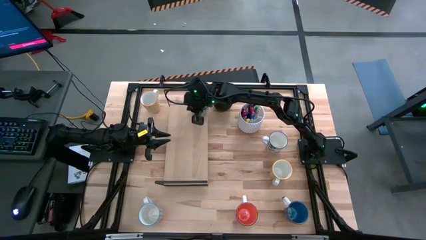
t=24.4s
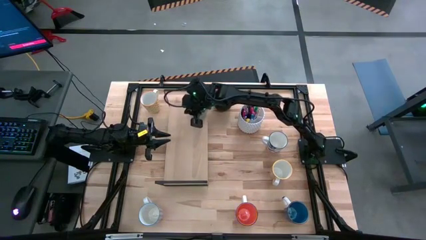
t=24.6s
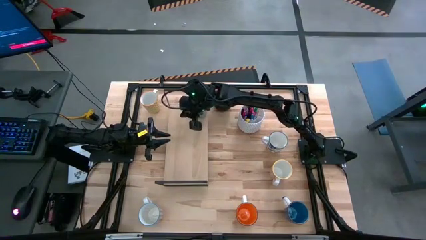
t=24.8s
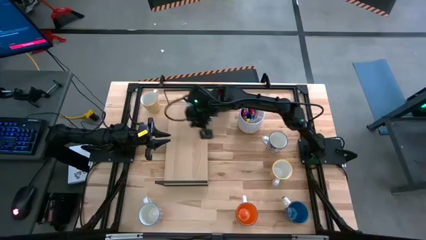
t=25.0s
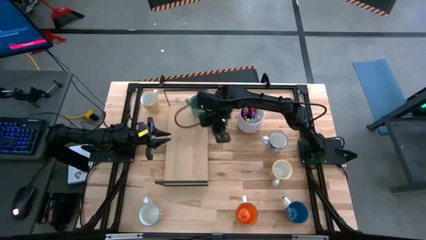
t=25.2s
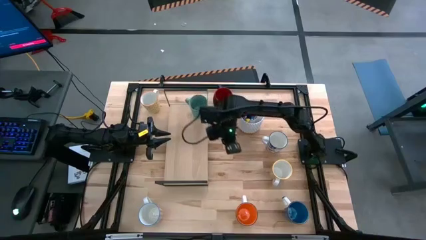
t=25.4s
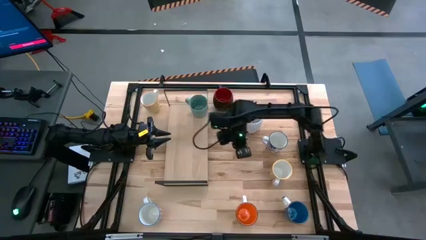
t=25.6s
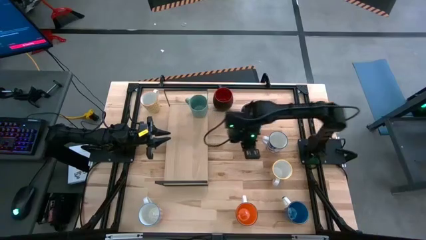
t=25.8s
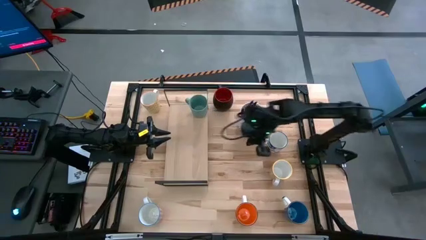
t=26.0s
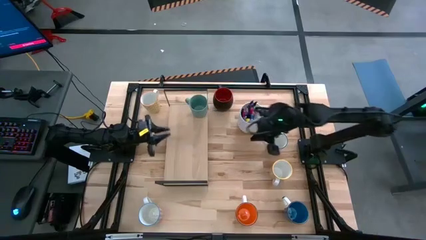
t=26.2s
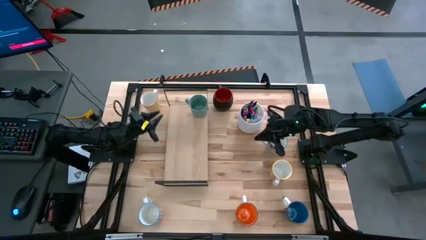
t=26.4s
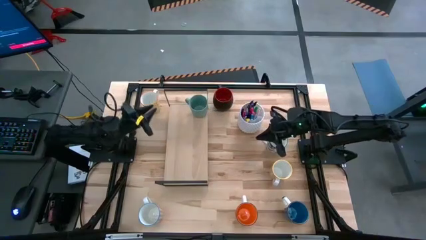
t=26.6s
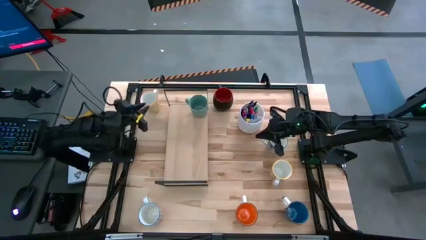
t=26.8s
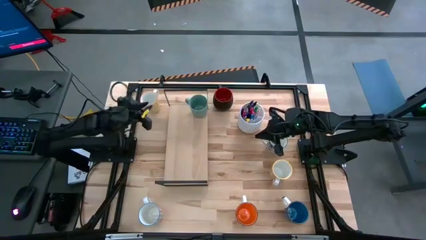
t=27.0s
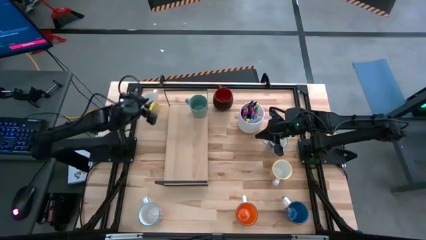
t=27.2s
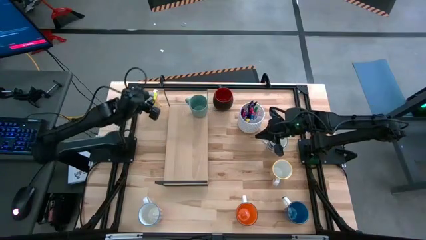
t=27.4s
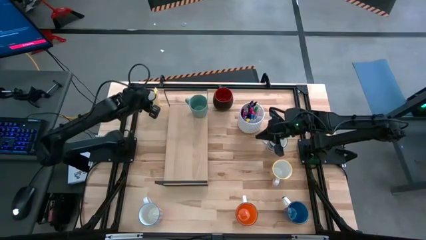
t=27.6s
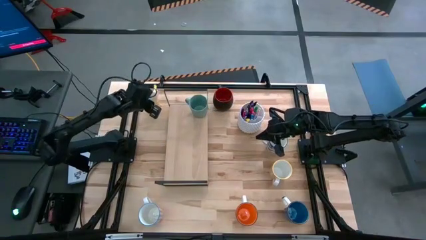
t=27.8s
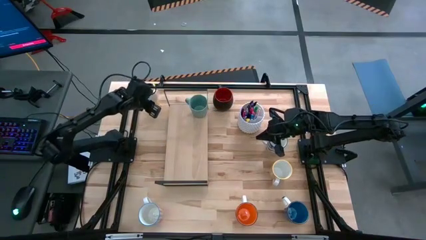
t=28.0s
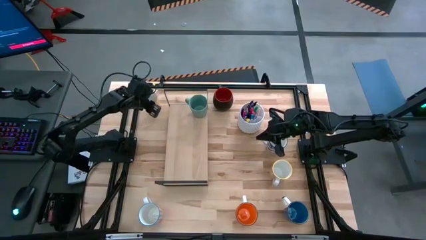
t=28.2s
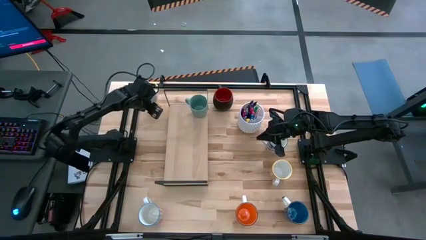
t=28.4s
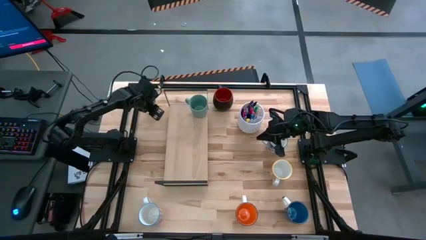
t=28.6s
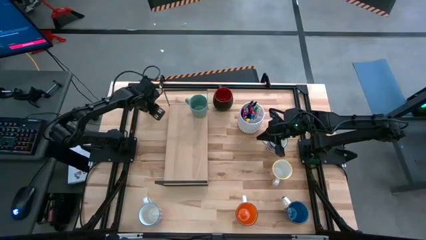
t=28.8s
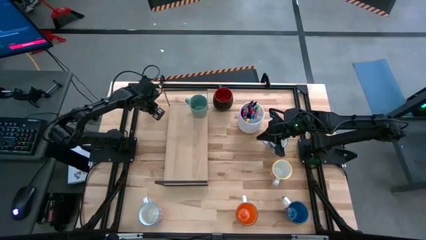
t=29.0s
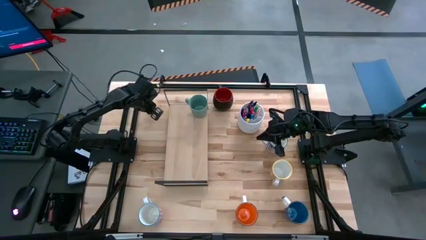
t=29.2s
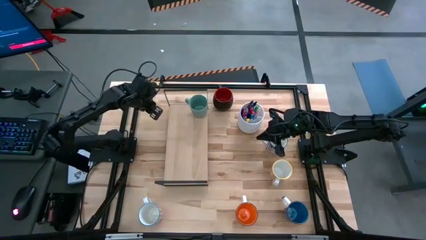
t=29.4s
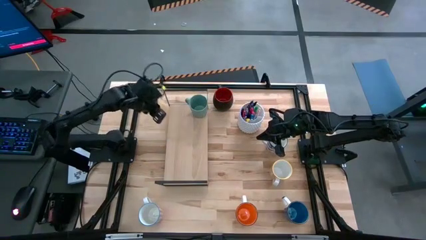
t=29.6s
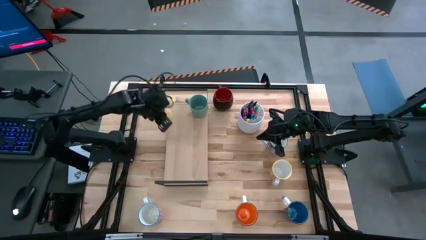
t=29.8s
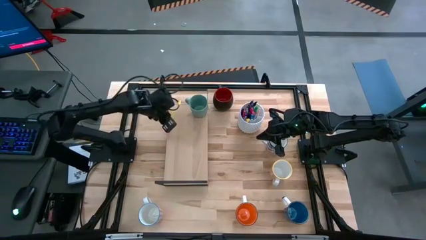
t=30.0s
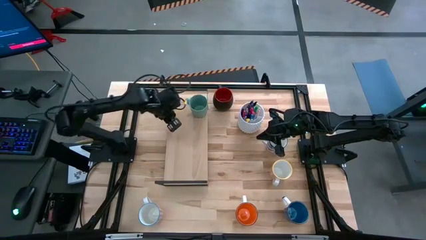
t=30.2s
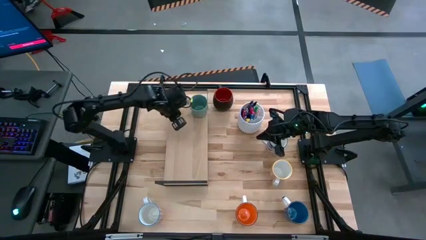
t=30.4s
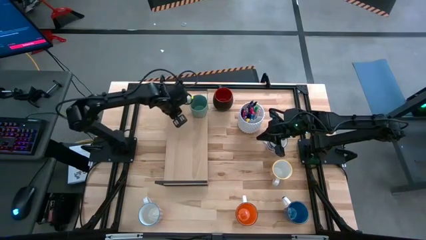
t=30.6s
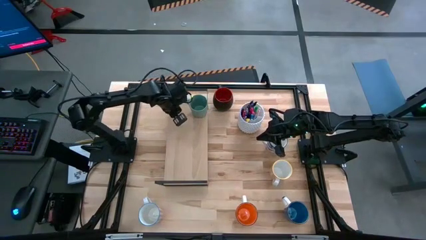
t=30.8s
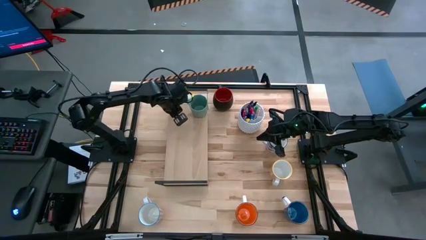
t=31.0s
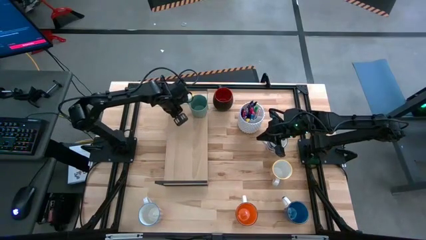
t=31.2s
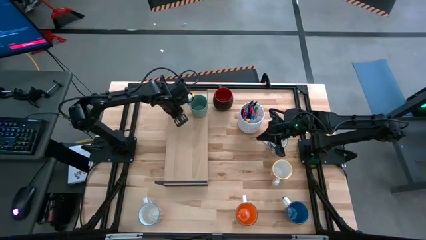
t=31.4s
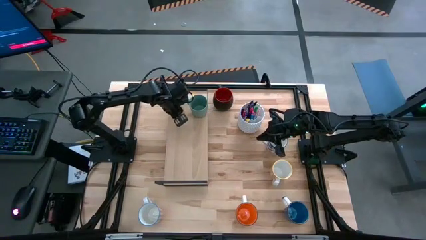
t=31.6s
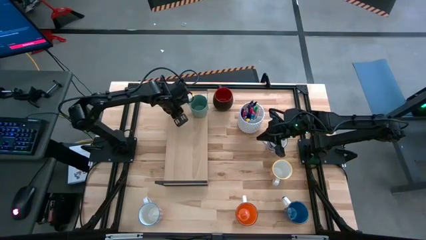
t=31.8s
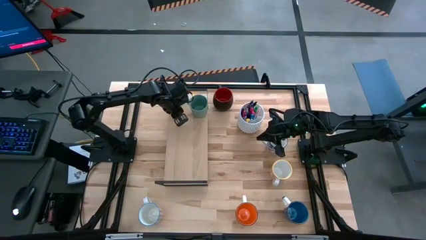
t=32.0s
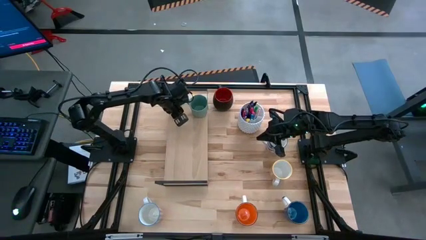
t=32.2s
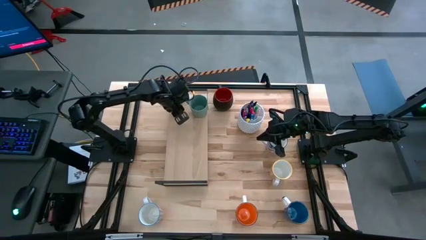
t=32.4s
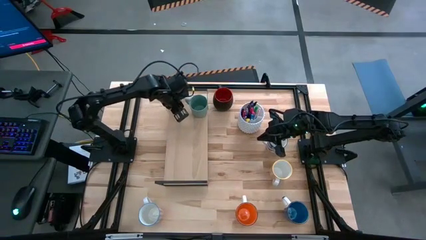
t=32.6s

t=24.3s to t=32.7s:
Task: Place coffee mugs
Put the yellow mug on the shelf

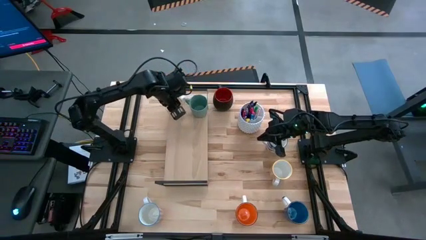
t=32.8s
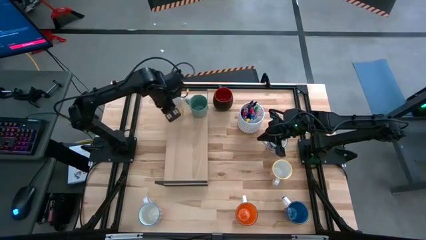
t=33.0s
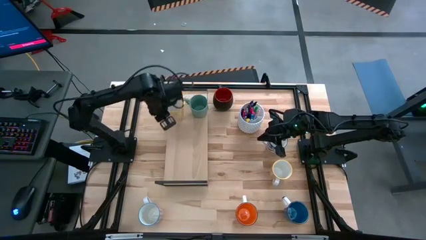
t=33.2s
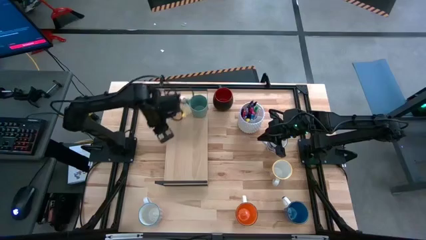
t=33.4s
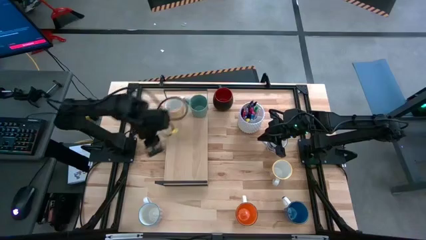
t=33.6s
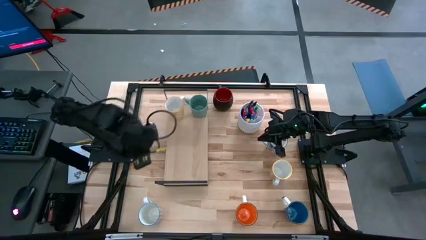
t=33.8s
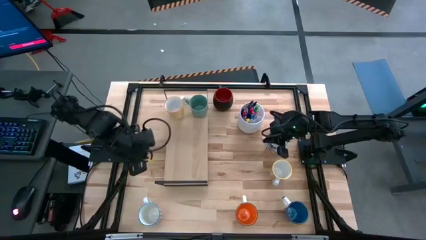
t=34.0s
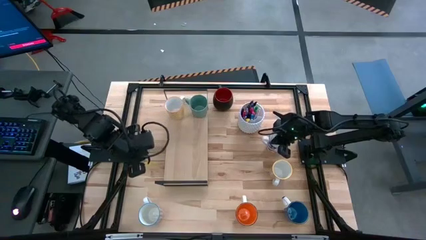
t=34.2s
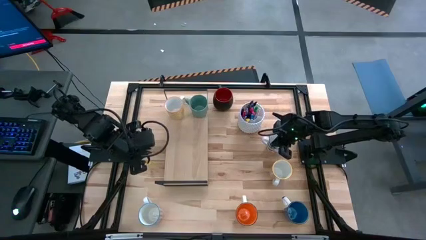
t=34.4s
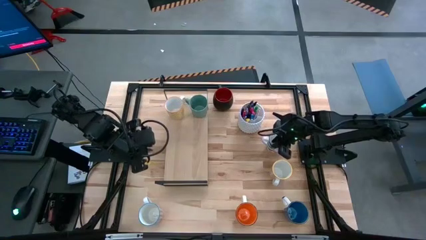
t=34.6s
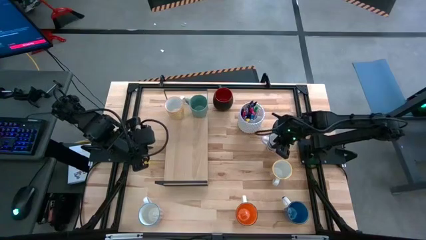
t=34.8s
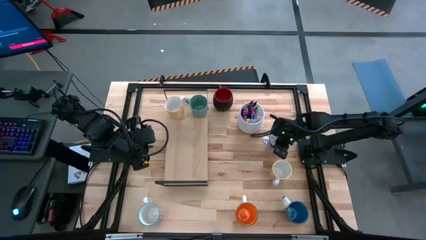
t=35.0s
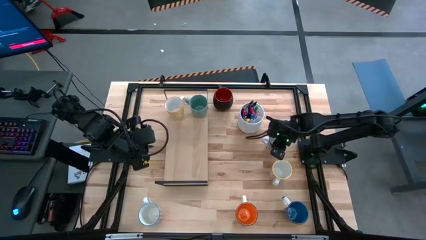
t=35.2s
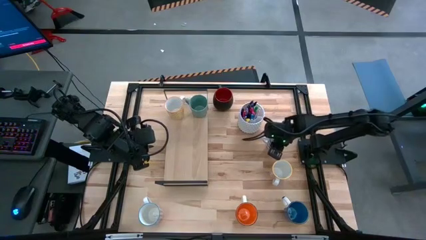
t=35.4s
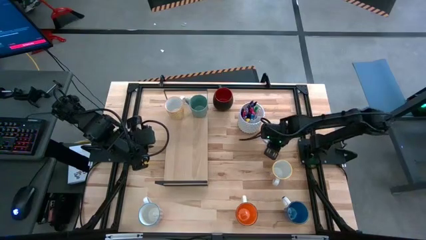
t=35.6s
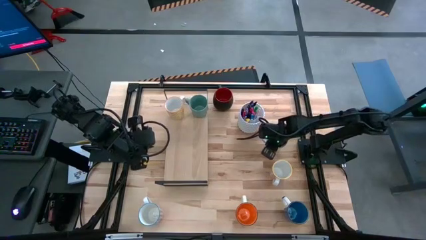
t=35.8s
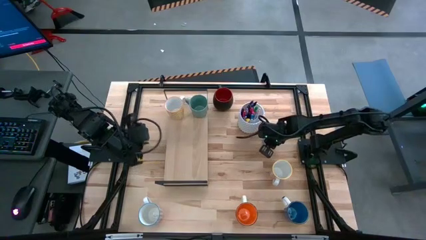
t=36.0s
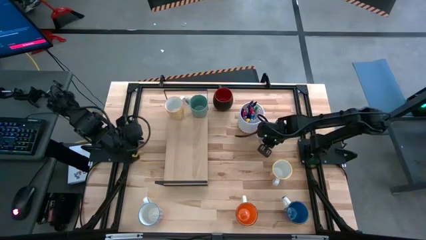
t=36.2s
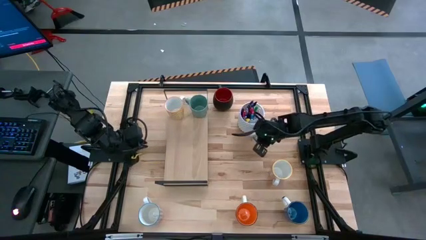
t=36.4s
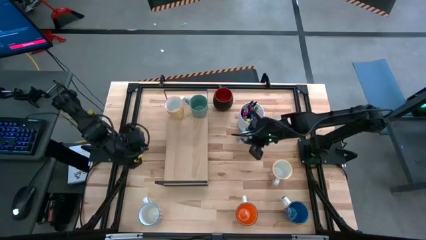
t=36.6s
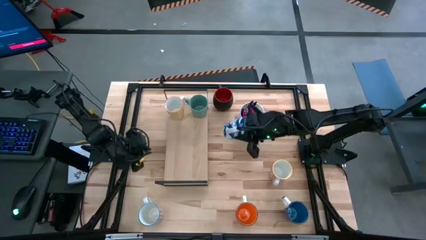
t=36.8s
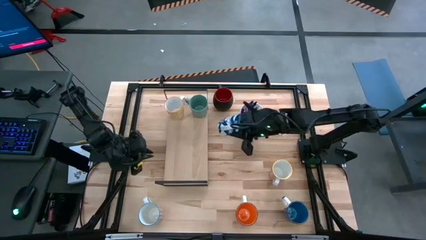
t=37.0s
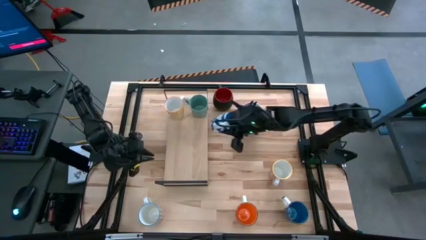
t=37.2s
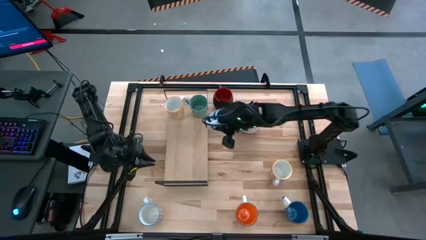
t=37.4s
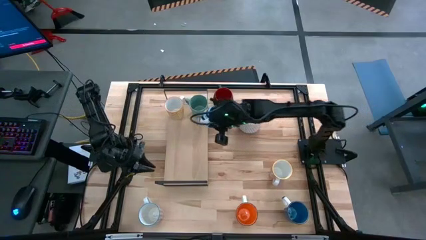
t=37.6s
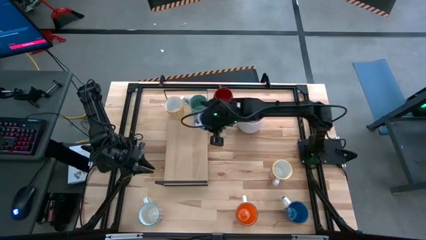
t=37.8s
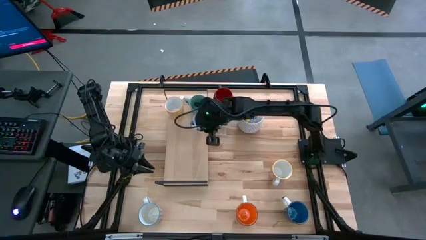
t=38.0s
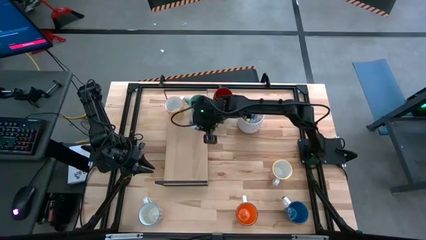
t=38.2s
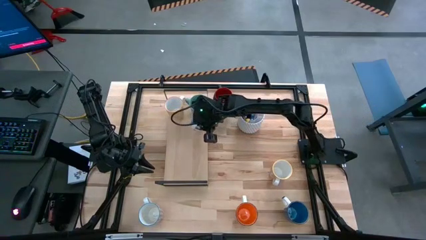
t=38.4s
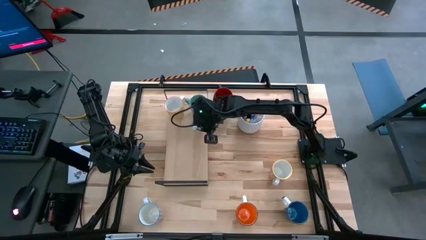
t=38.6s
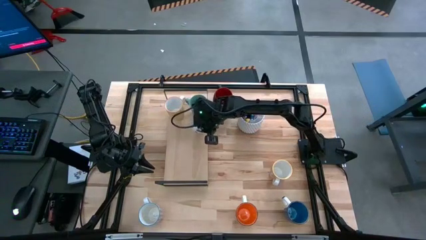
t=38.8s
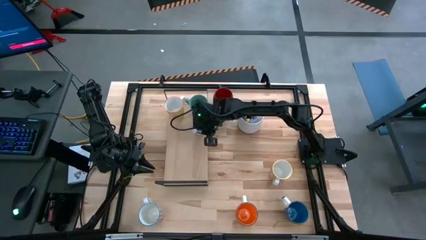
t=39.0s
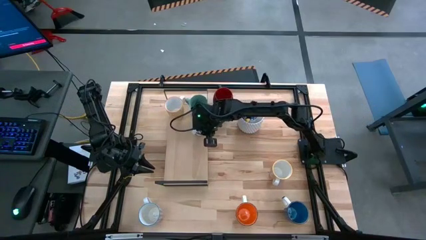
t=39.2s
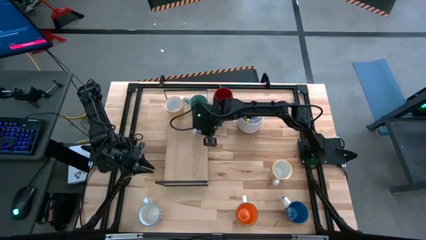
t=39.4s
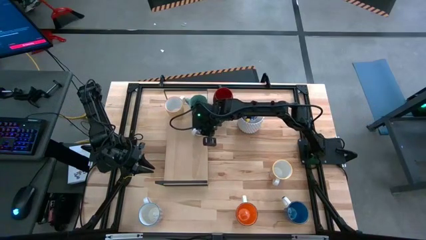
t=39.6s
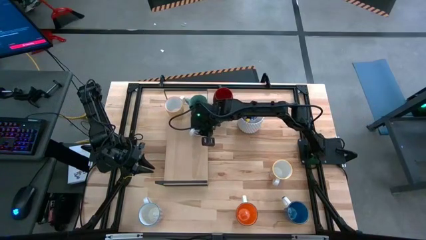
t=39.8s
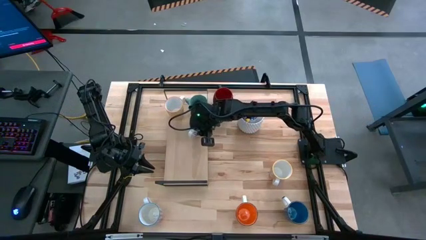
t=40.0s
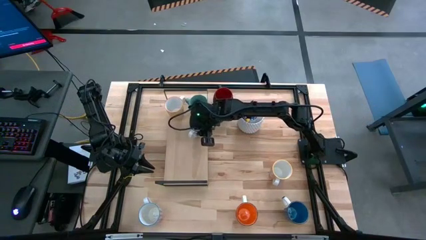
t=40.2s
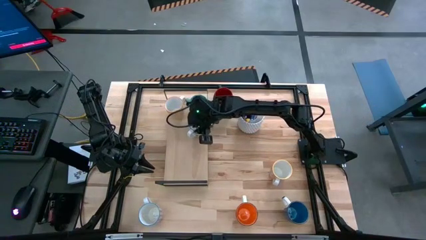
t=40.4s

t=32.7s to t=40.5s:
Put the blue patterned mug on the shelf
